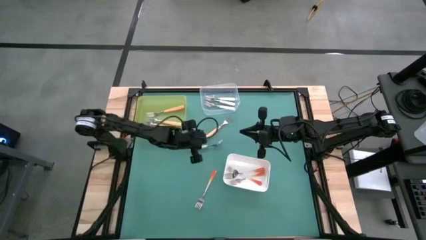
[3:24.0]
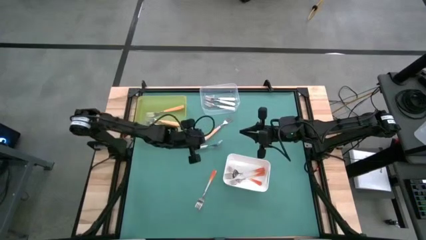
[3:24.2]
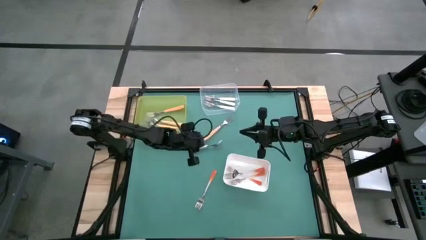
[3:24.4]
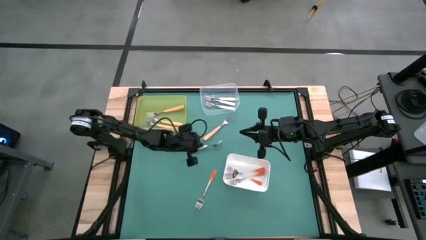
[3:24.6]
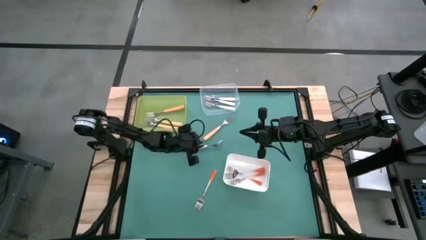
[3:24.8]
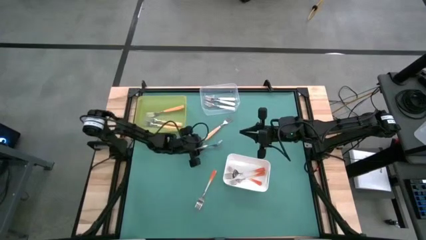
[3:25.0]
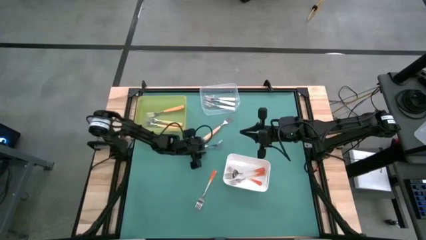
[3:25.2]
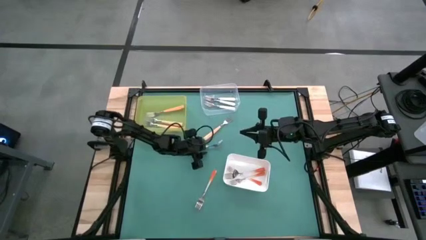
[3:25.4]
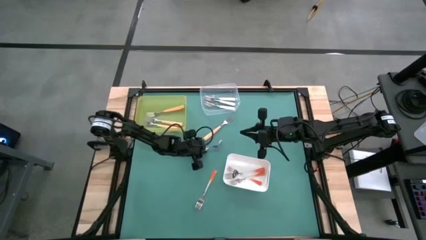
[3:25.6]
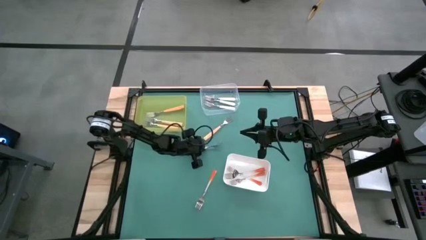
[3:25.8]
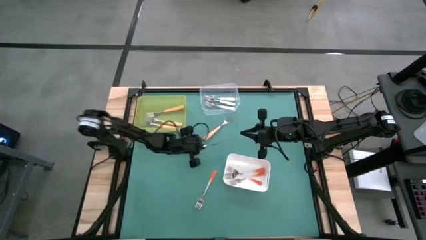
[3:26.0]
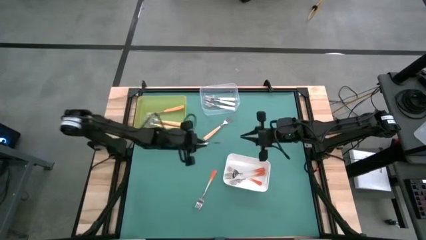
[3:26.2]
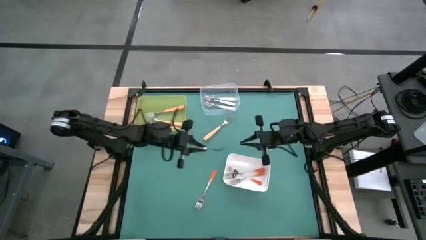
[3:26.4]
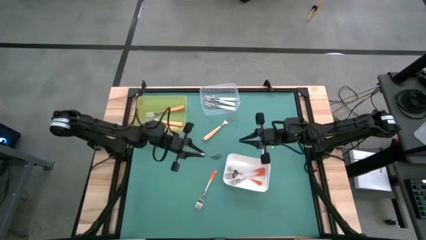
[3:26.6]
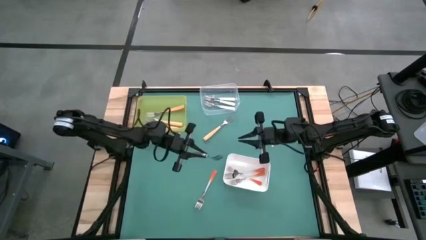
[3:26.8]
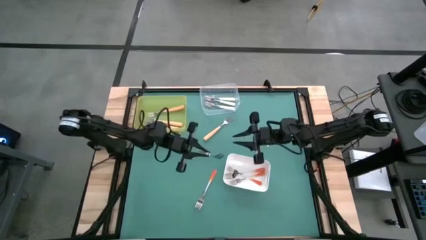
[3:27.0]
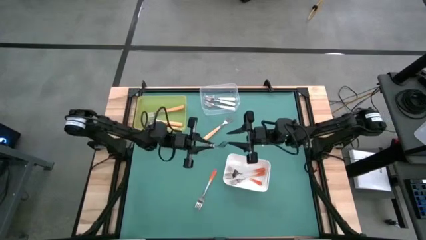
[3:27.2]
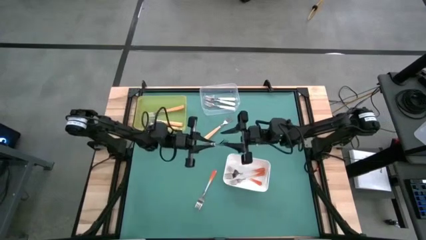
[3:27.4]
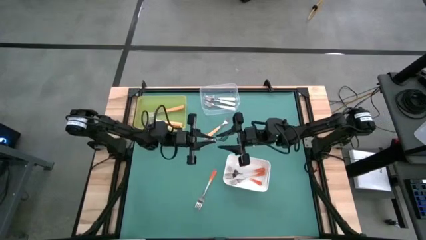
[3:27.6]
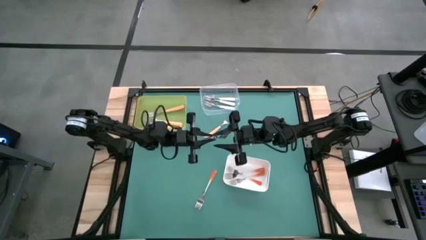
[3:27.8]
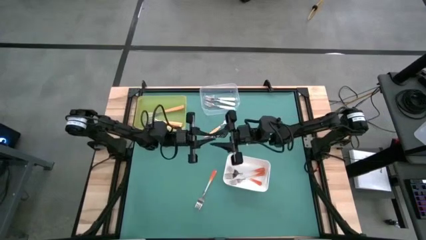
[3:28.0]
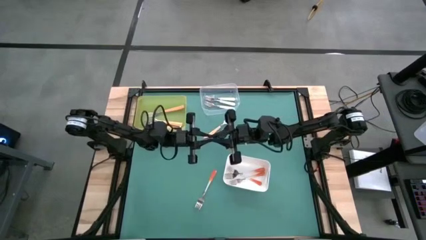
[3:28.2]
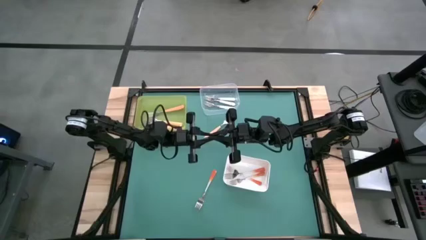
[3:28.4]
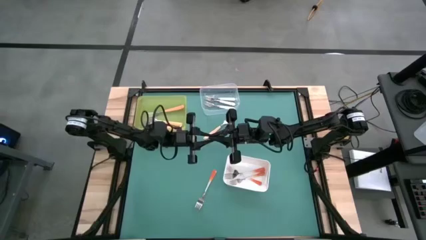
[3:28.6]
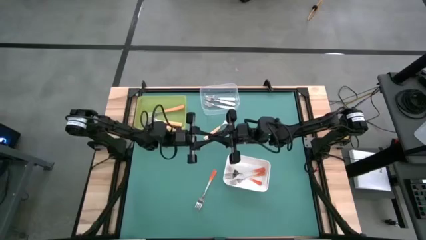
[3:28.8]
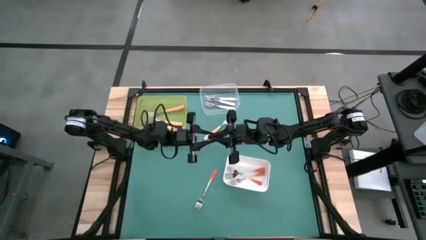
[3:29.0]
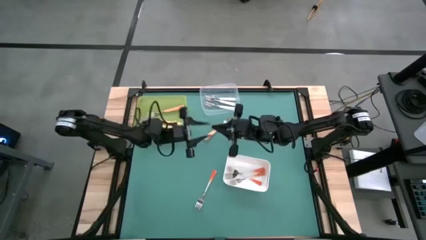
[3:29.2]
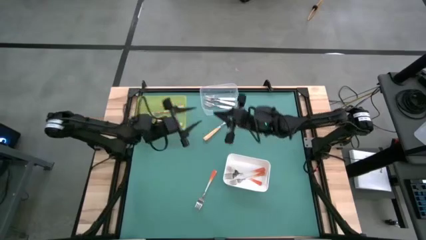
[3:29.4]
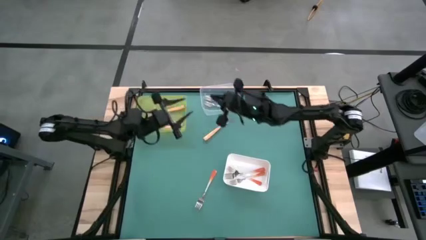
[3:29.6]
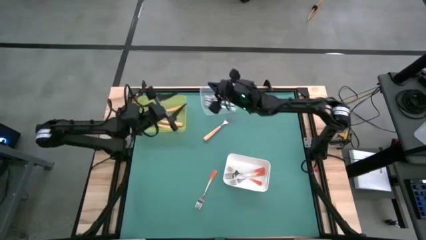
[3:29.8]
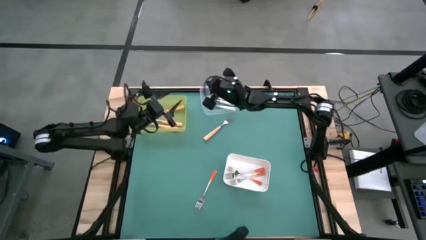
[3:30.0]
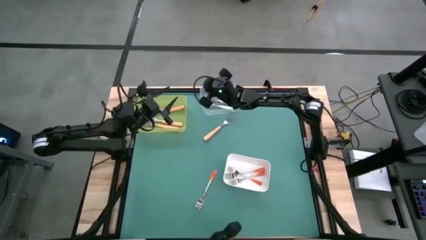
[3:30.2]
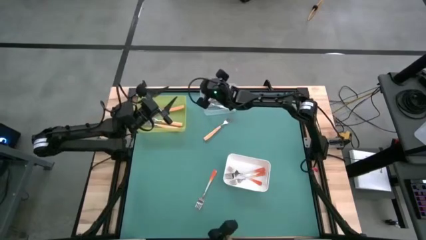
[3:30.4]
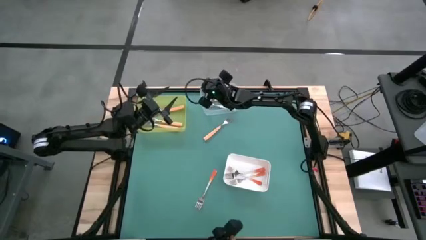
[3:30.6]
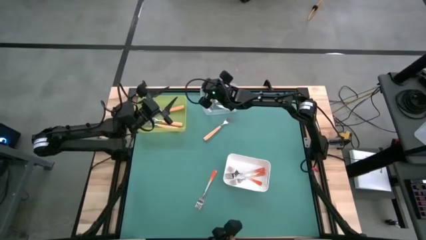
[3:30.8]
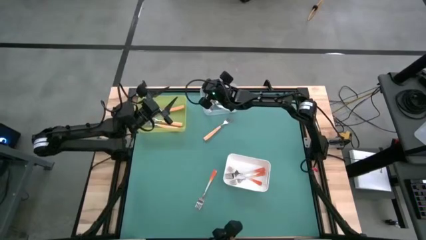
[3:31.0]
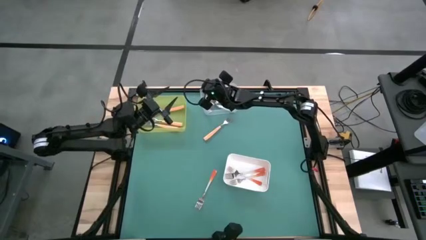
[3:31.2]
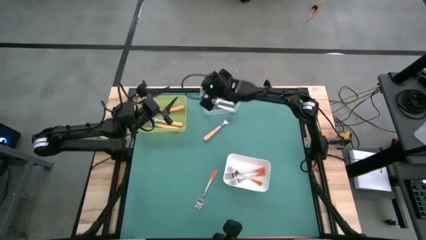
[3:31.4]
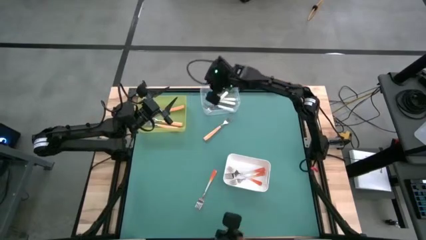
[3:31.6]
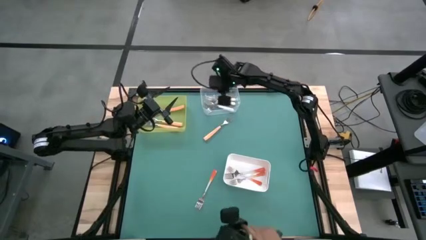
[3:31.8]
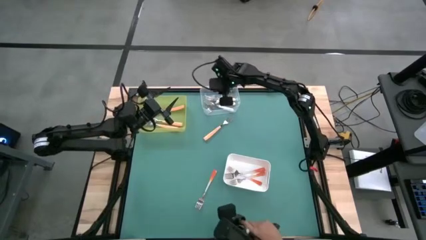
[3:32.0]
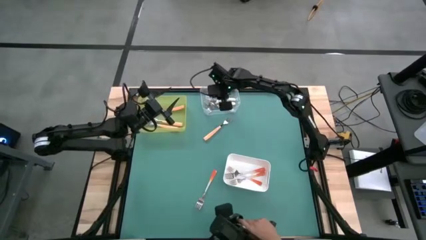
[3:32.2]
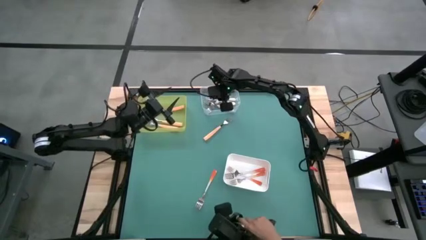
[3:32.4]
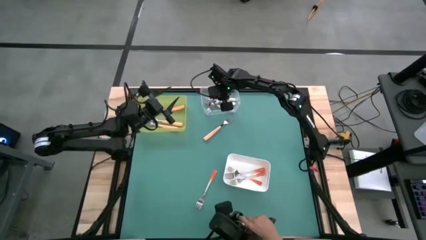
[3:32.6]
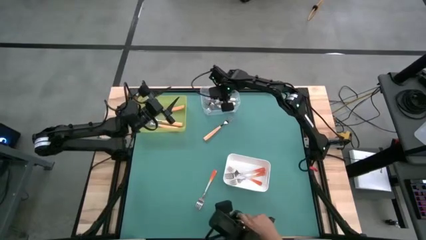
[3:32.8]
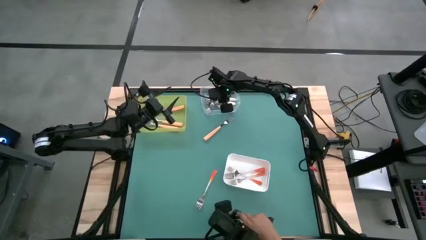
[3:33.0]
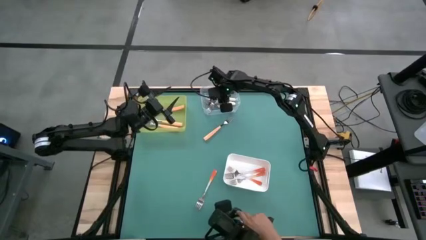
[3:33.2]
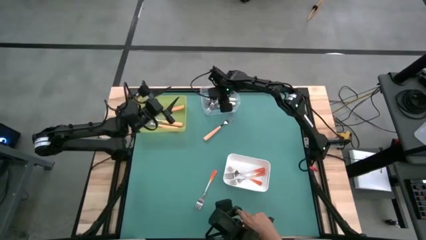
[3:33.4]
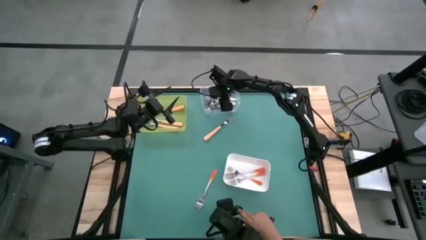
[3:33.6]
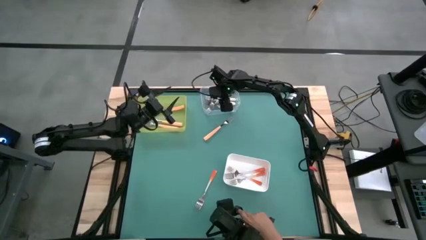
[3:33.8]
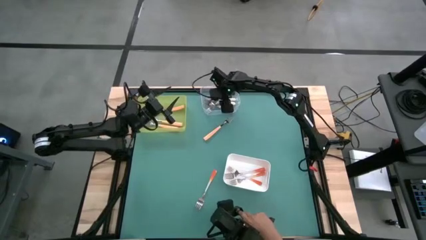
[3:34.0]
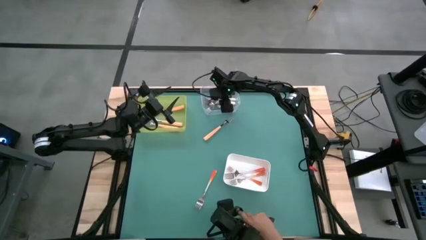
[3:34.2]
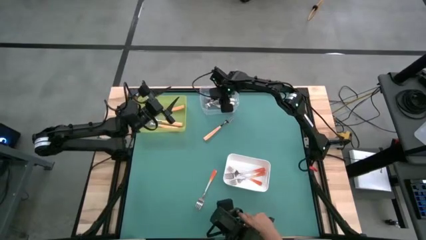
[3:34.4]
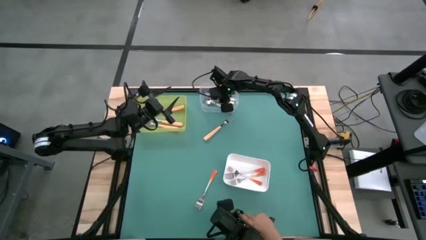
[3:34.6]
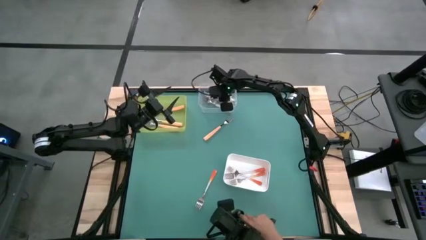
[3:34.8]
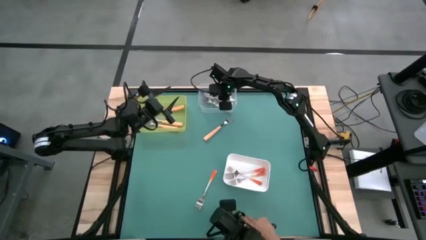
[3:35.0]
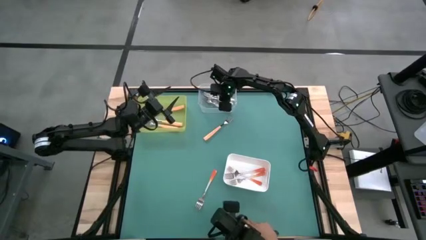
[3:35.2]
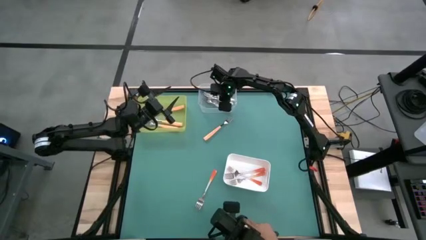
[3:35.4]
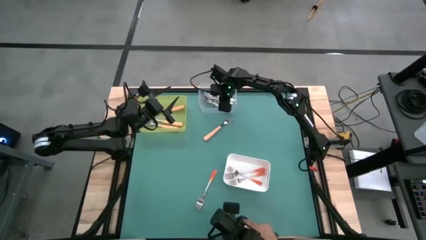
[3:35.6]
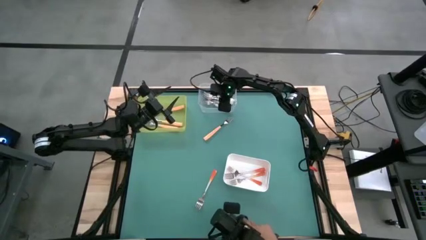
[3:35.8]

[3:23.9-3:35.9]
Task: Sort silverware by color (type)
Put the white fork into the transparent bin

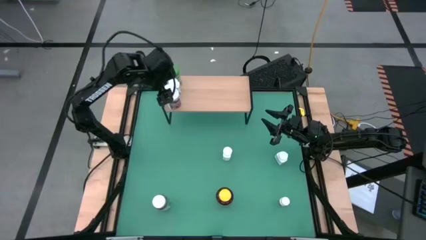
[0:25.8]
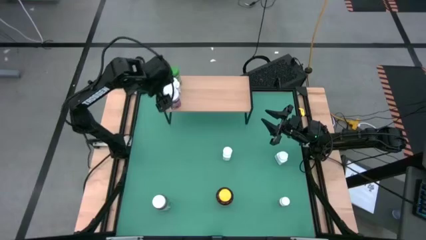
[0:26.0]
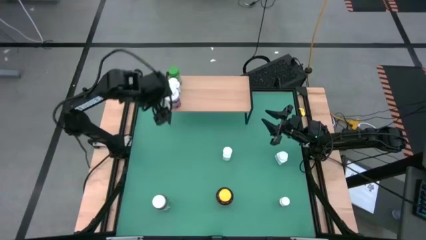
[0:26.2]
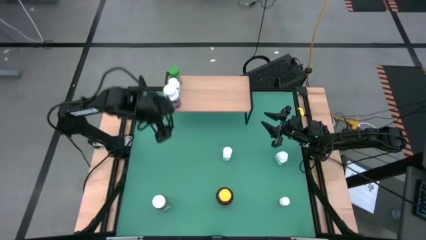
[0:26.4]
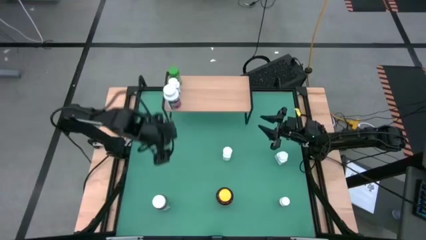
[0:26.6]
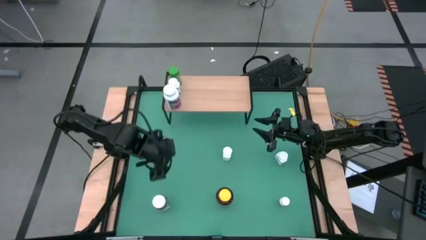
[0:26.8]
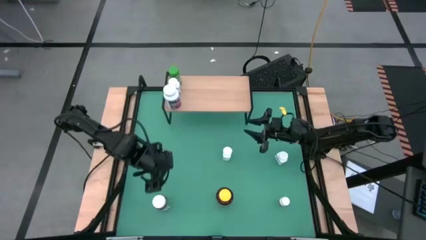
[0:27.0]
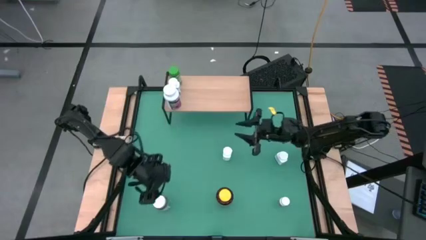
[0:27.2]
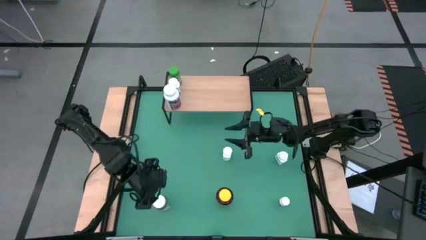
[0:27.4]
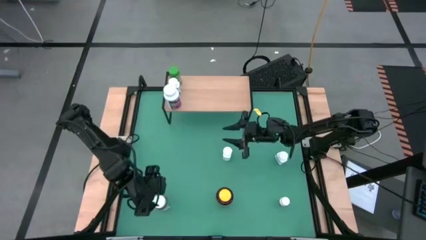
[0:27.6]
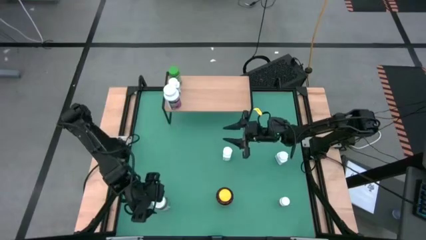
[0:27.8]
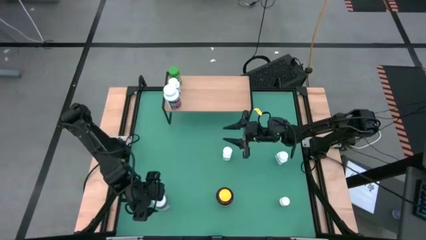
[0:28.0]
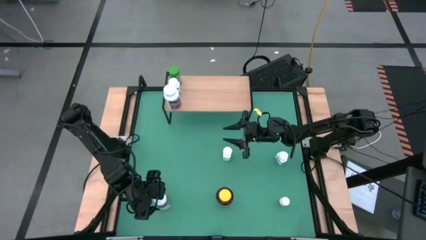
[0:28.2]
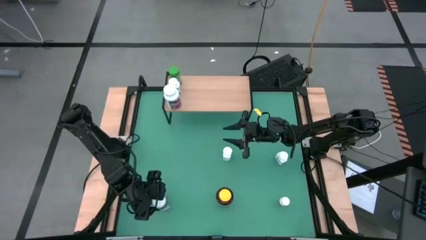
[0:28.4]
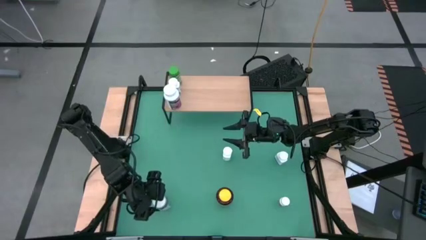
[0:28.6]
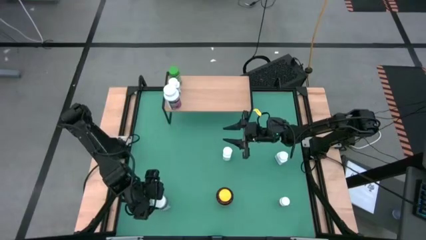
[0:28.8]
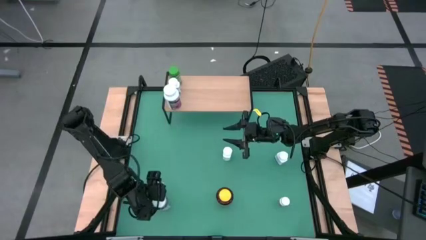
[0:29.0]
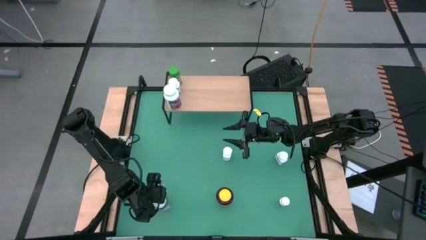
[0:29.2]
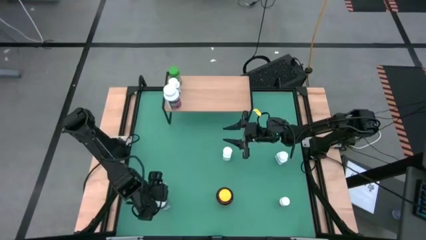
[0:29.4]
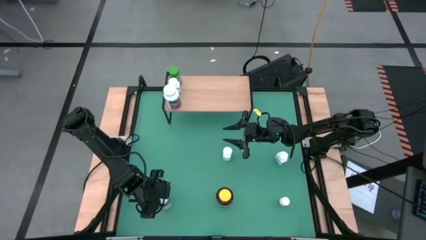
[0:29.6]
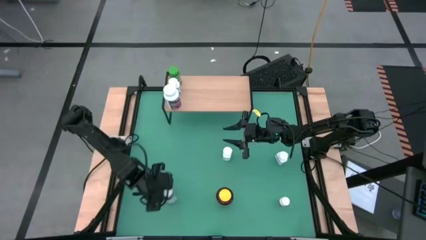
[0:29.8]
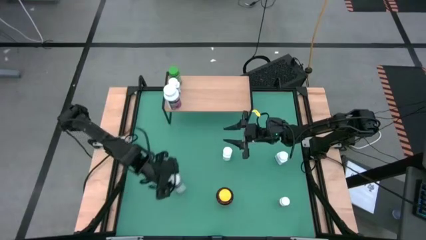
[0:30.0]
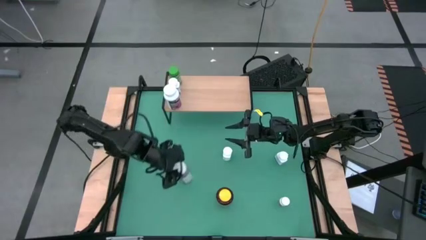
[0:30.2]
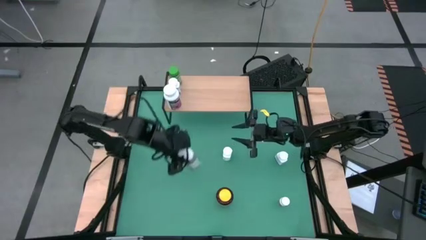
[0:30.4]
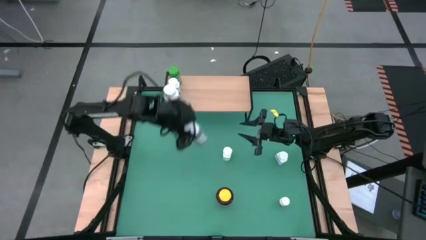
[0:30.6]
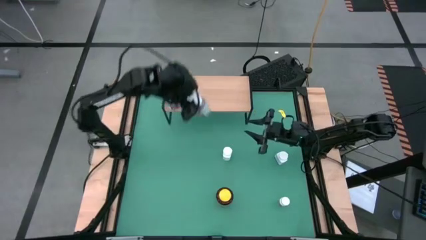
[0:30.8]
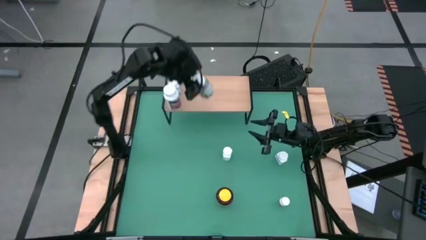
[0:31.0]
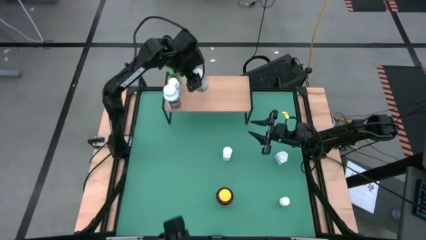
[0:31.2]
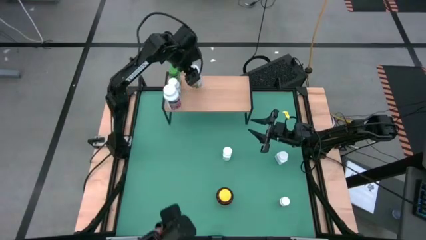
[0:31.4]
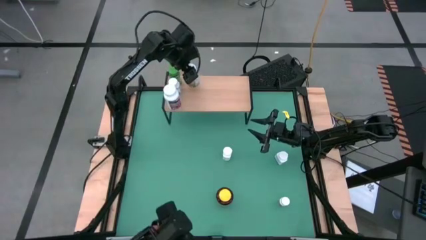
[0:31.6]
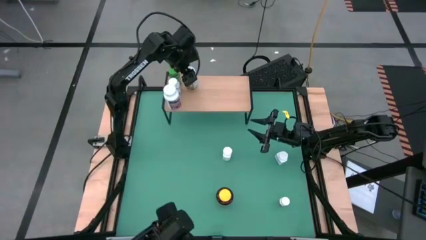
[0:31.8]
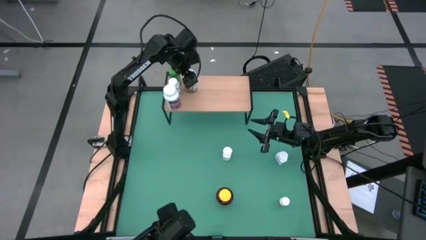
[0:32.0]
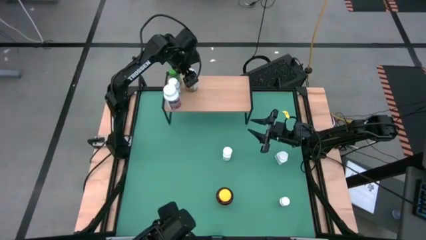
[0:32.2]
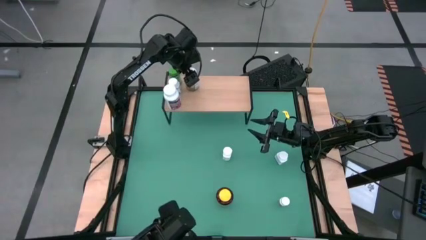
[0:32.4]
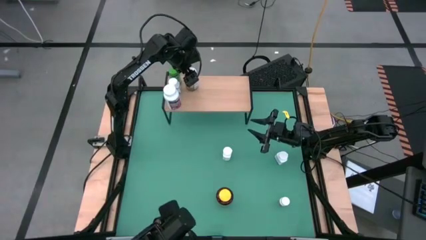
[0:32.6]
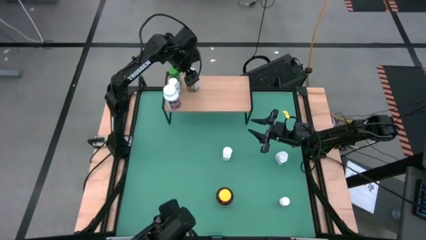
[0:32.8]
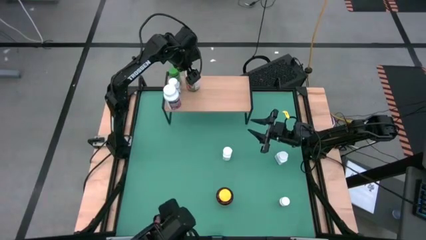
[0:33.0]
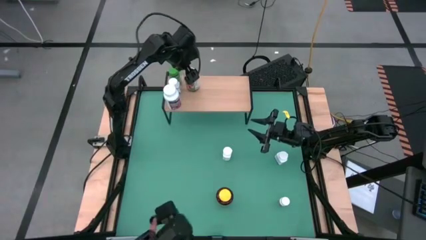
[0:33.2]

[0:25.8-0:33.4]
Task: Pick and place medicine bottles onto shelf by color
Put the bottom left white supplement bottle on the shelf
